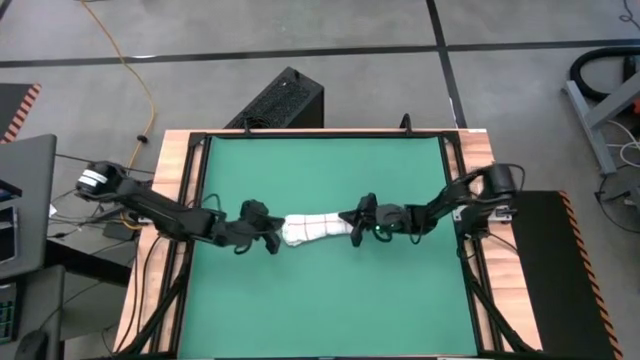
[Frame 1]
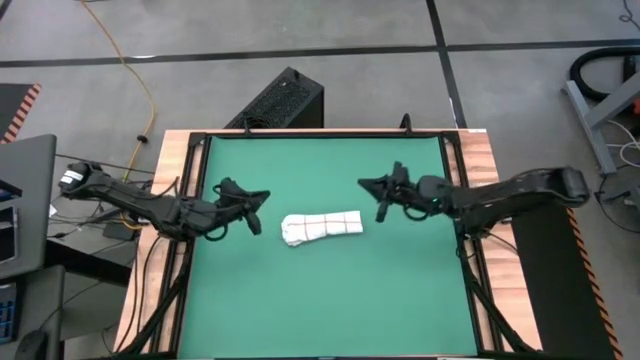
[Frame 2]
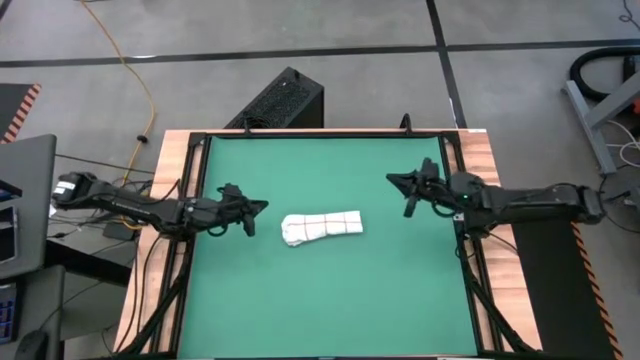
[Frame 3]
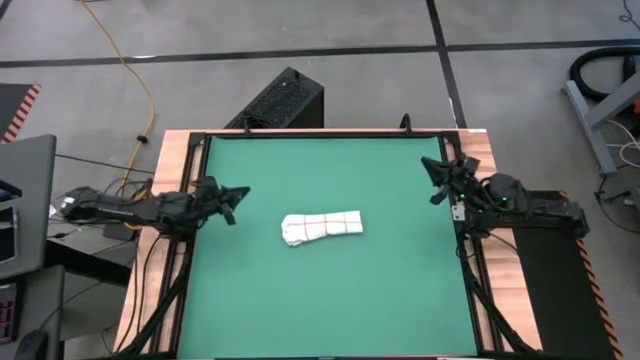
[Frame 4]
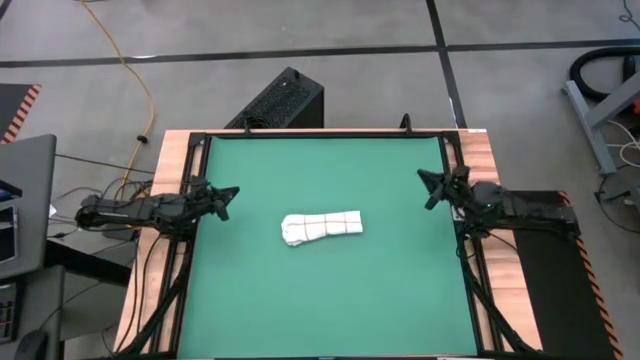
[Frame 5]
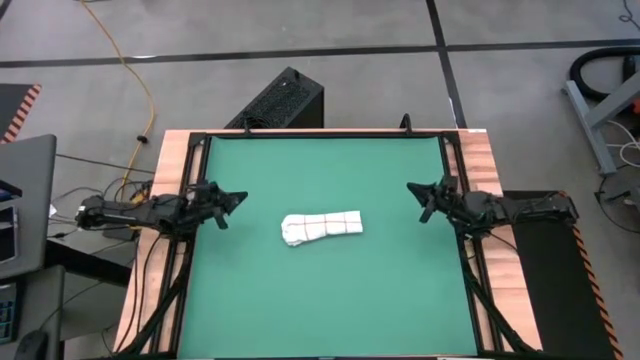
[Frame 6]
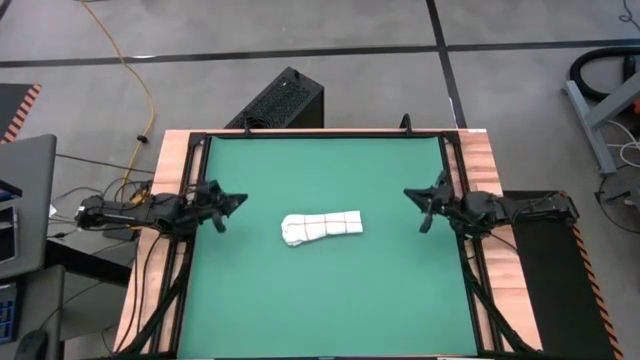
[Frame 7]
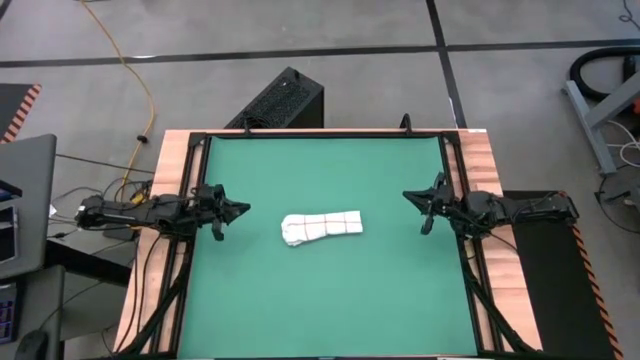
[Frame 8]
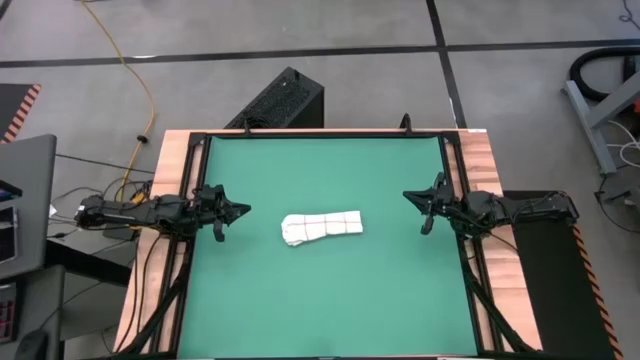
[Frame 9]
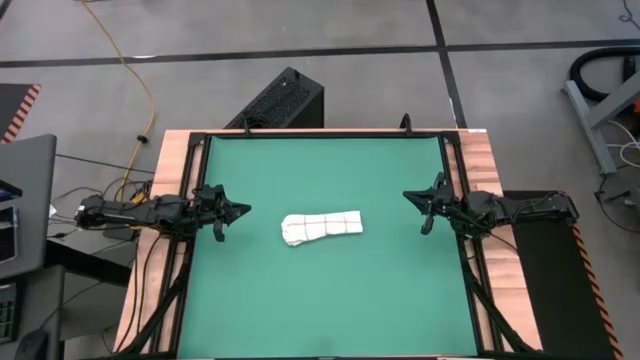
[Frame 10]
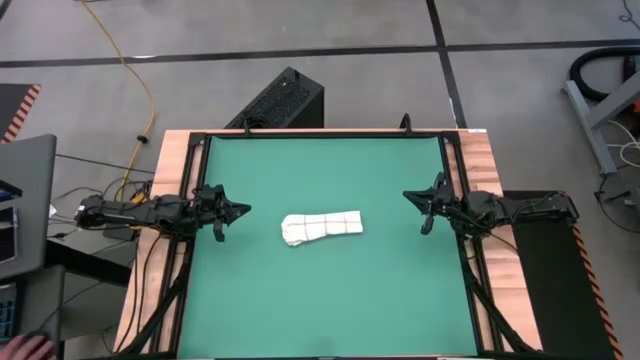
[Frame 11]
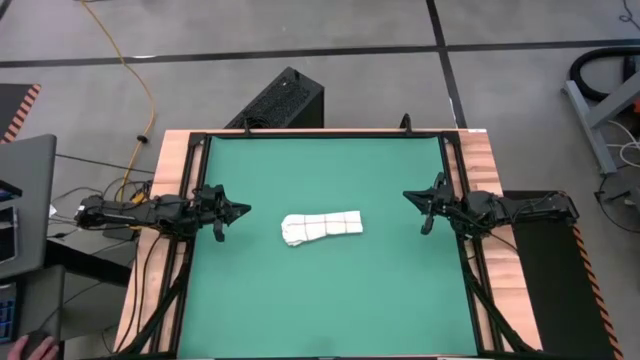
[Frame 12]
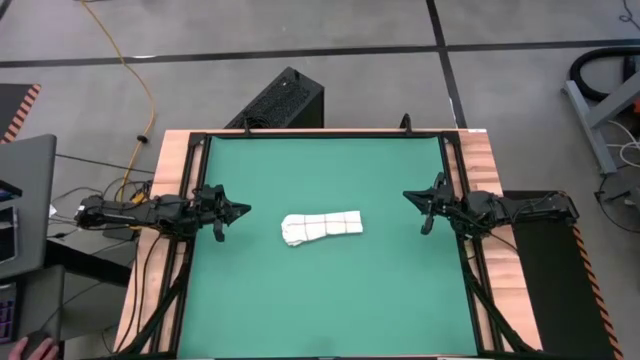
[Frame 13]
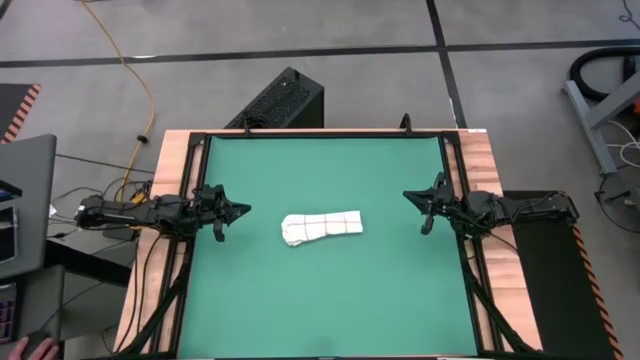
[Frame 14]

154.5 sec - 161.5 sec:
Task: Roll towel
Return to Home Position

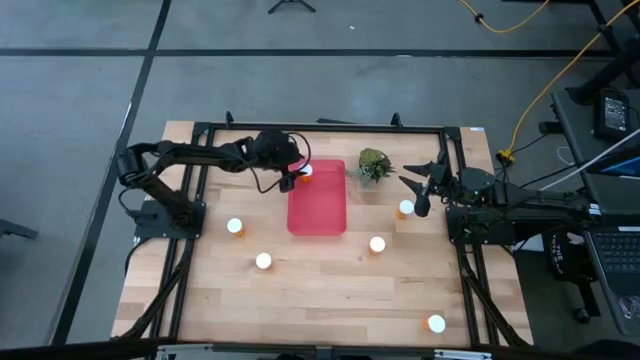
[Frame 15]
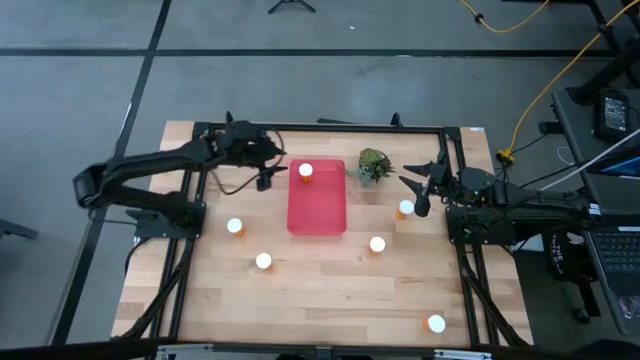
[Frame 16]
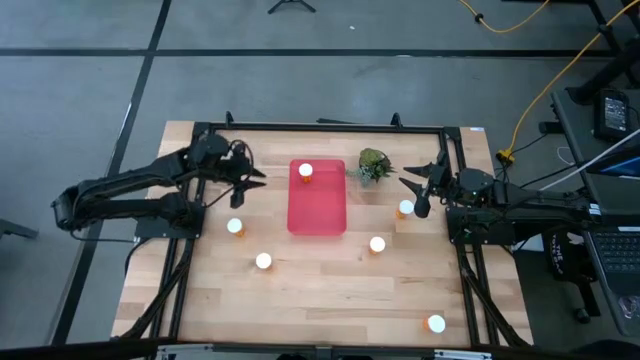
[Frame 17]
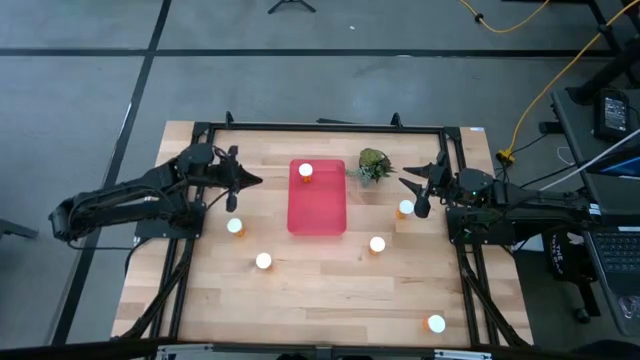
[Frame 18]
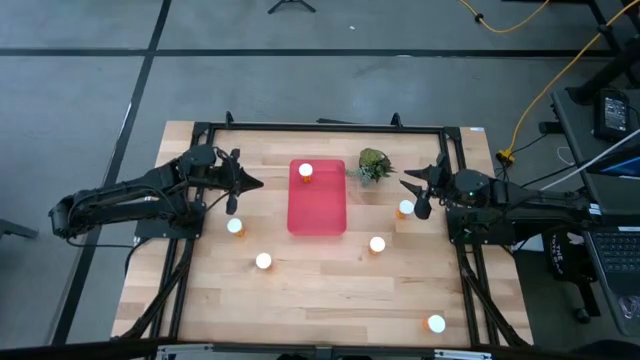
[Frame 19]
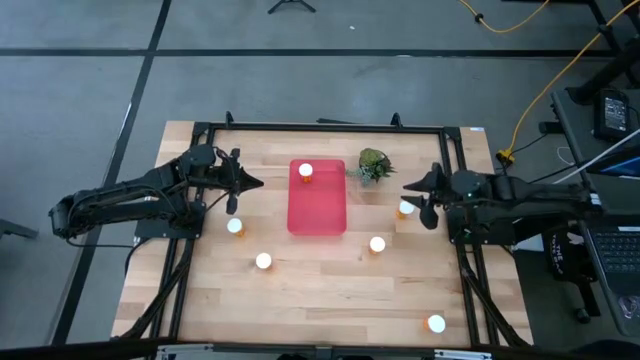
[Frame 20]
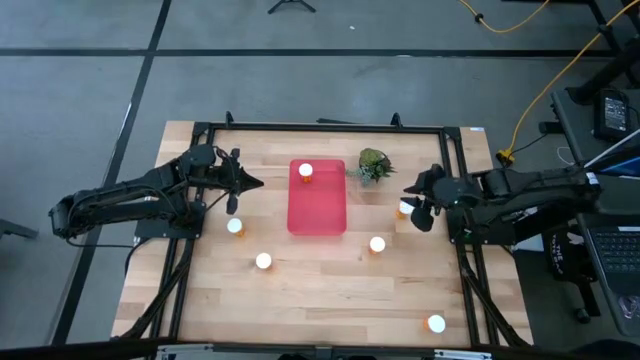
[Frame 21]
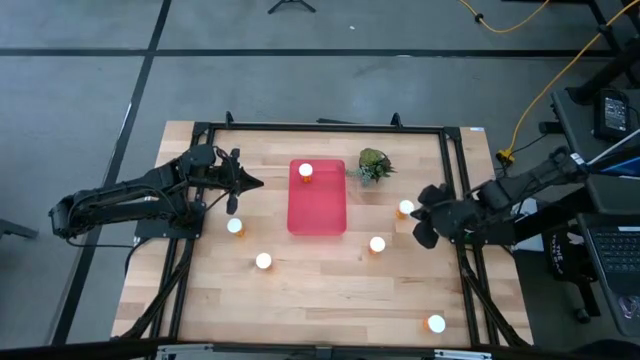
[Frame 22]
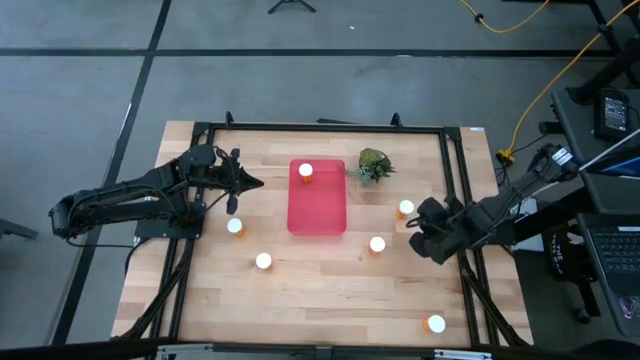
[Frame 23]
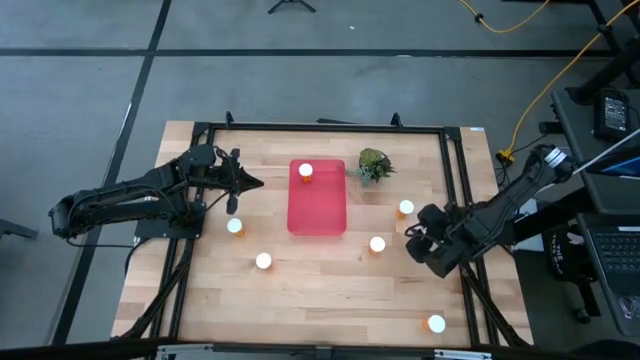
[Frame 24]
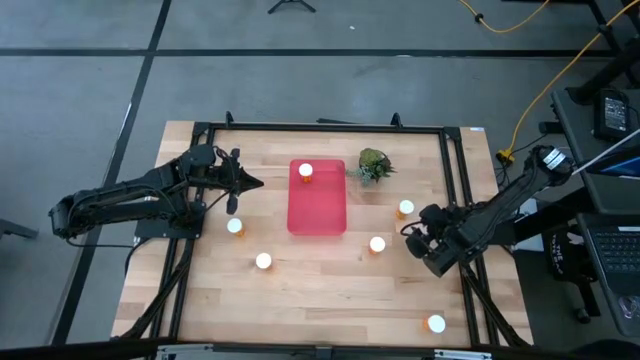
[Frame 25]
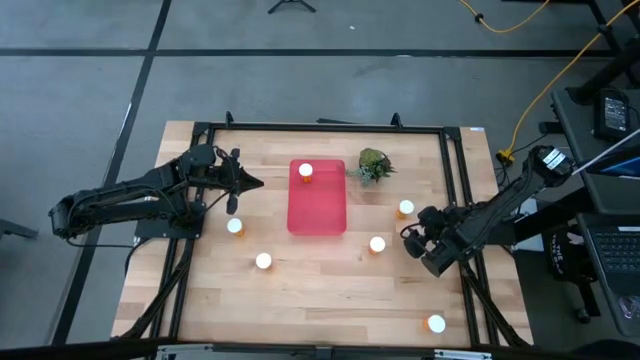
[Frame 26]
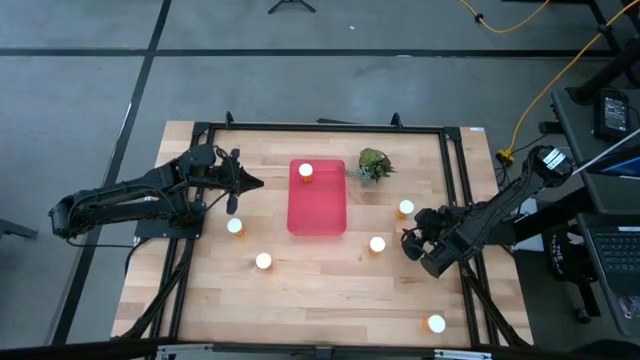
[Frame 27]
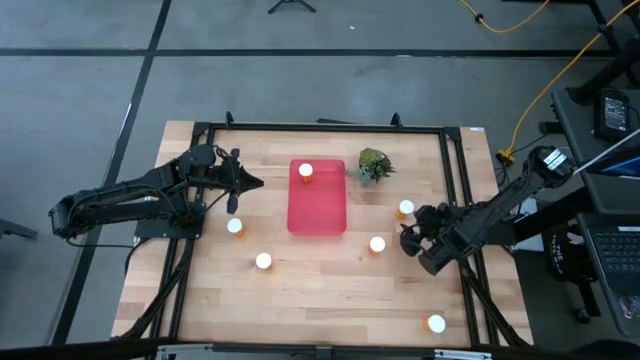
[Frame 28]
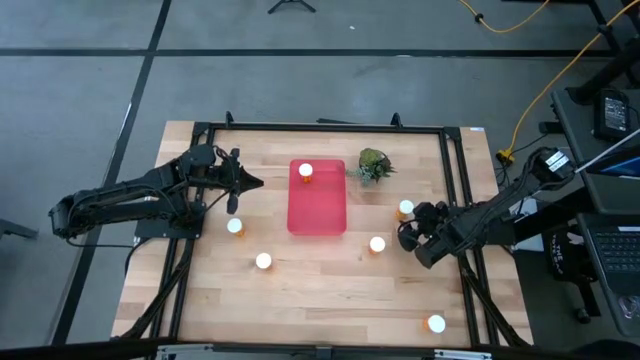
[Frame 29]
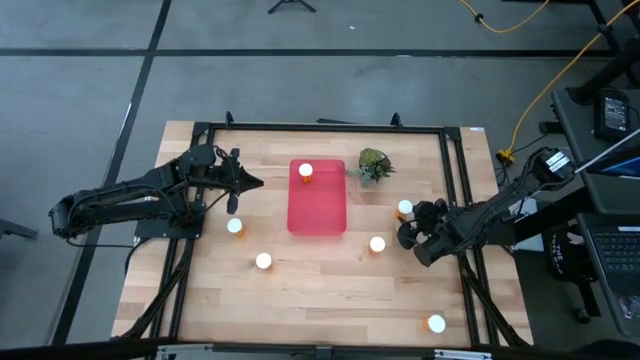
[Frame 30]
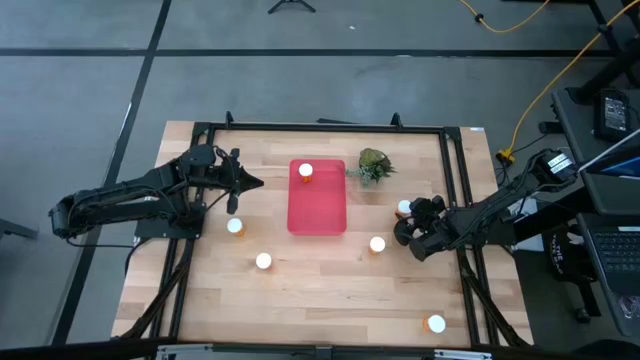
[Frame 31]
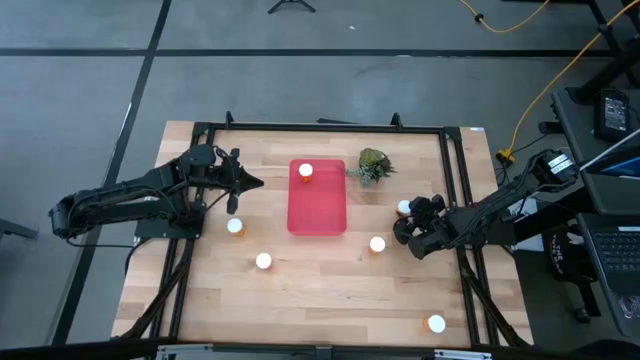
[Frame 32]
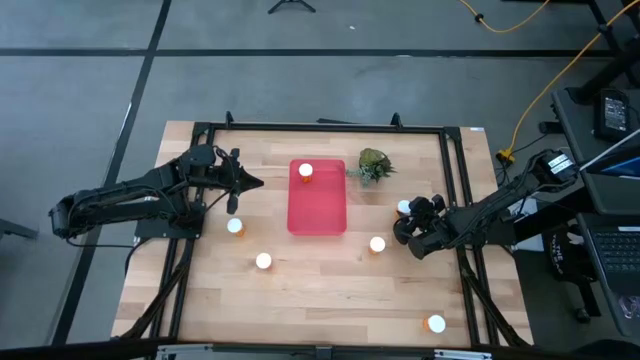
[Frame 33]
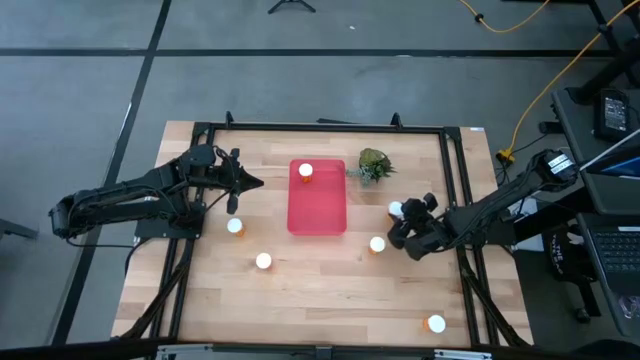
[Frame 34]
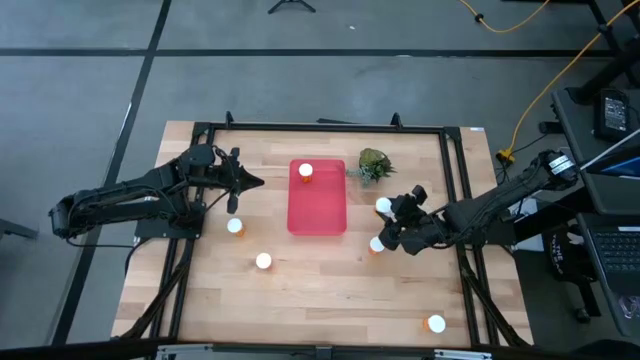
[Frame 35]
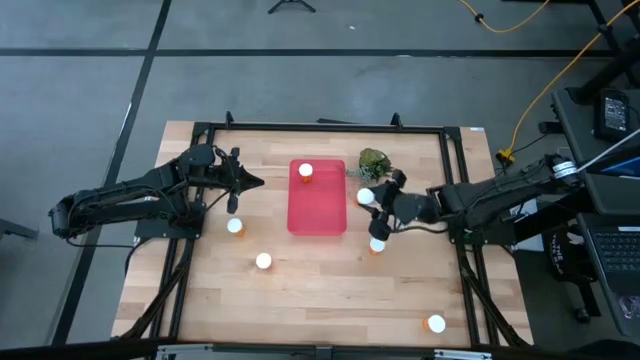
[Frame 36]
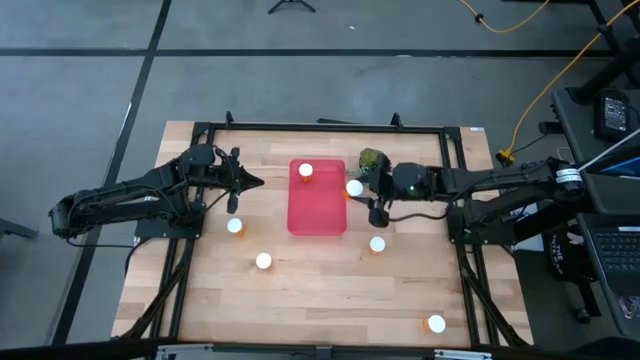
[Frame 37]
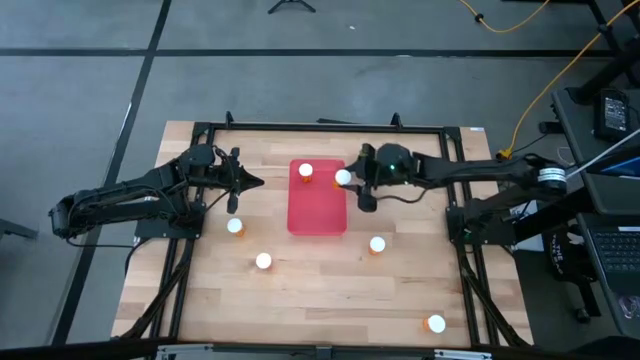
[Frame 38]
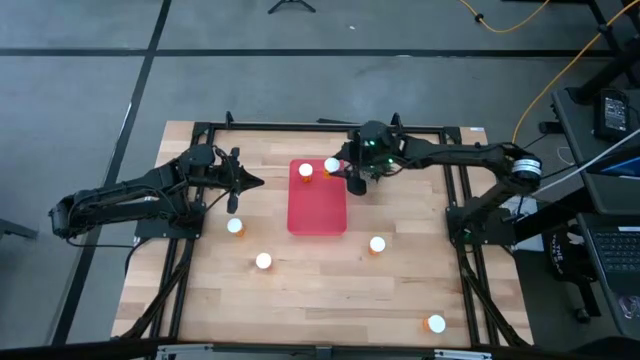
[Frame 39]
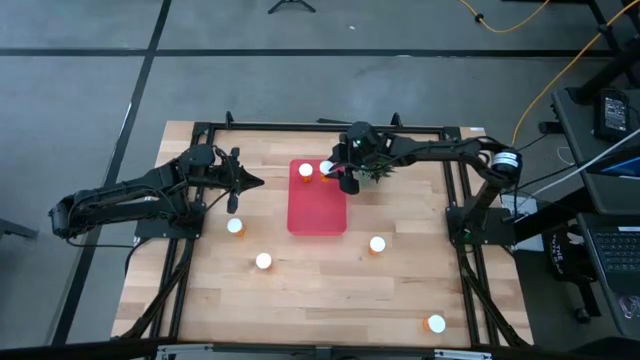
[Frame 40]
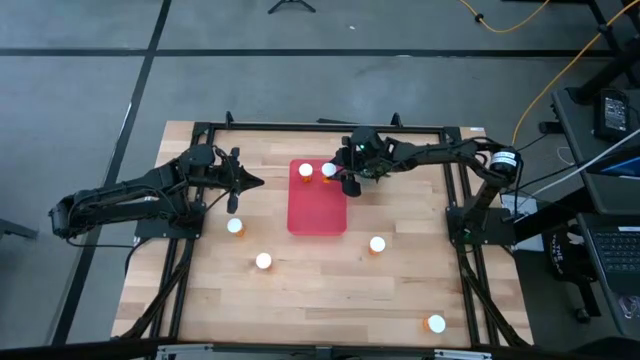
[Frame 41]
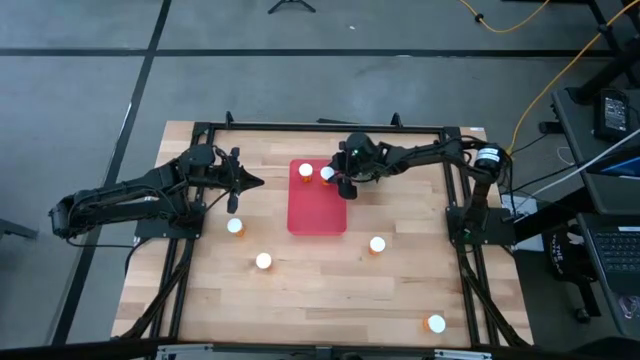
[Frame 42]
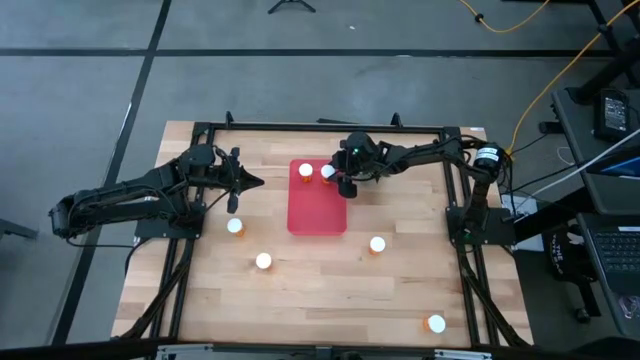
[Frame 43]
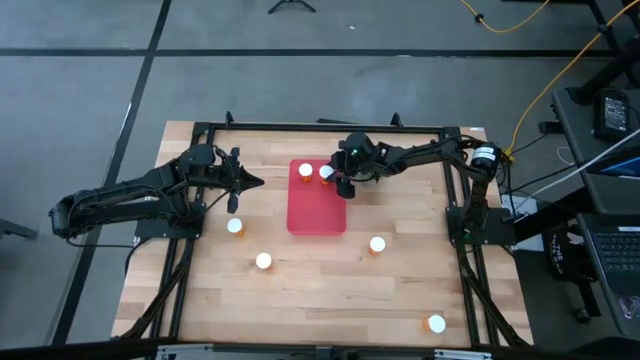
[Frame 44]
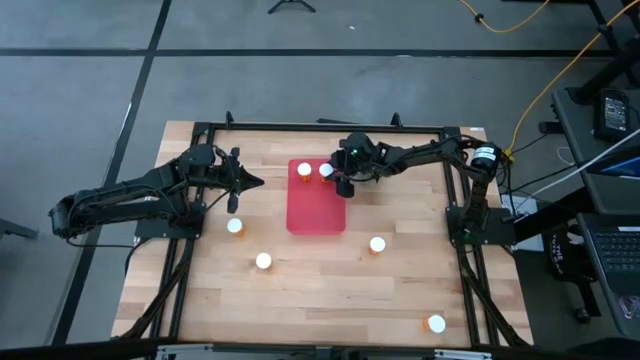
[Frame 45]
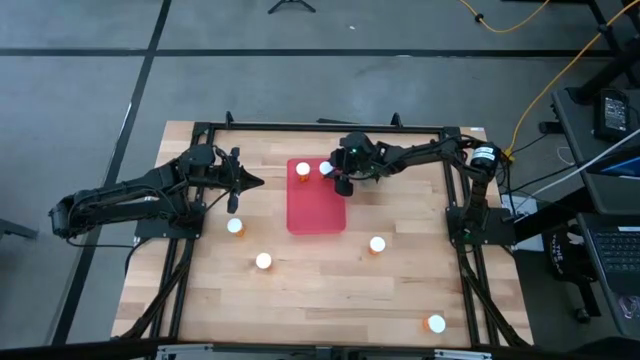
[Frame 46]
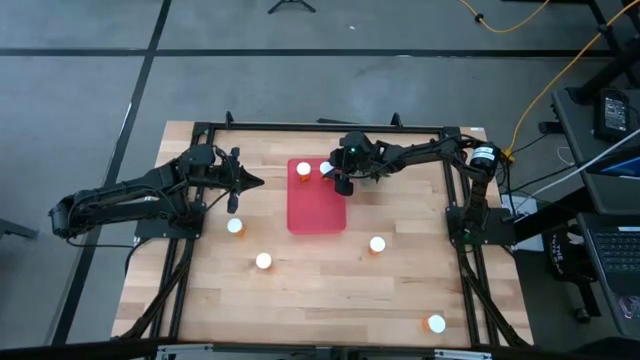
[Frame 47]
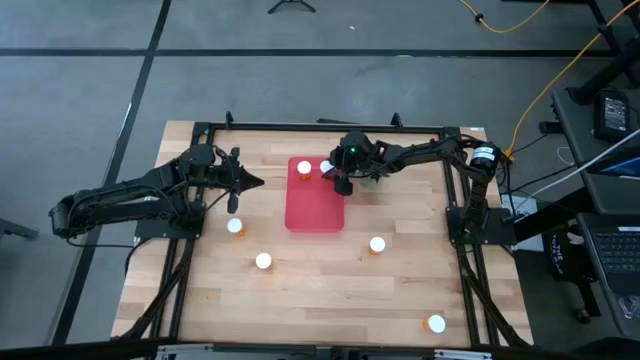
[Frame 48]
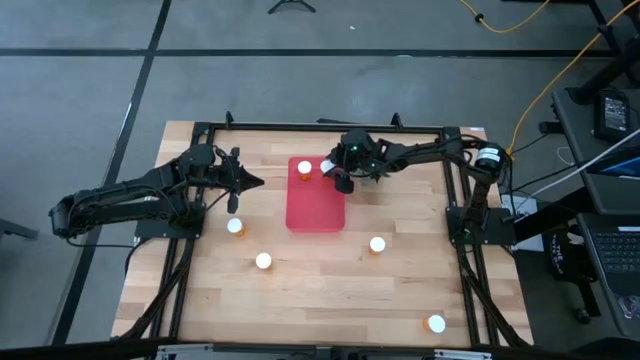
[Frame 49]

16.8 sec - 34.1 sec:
Task: Pick and place pill bottles into a basket
Put the orange pill bottle into the red bin
